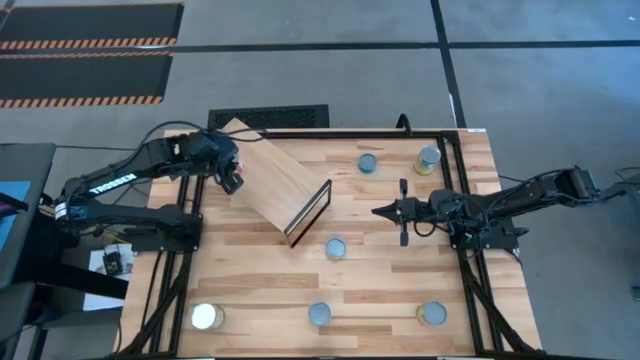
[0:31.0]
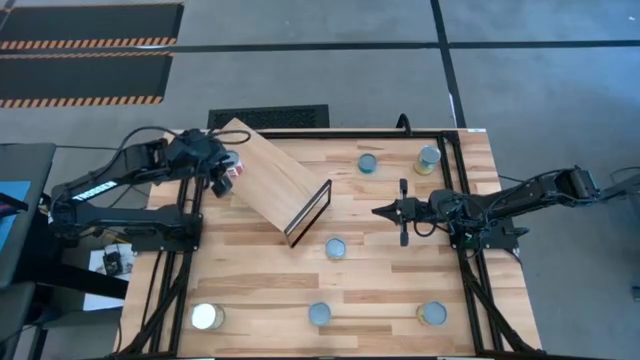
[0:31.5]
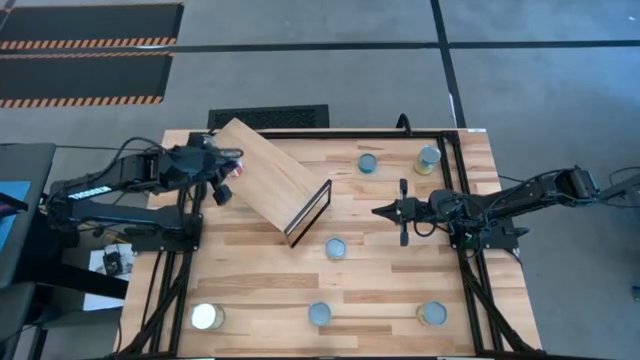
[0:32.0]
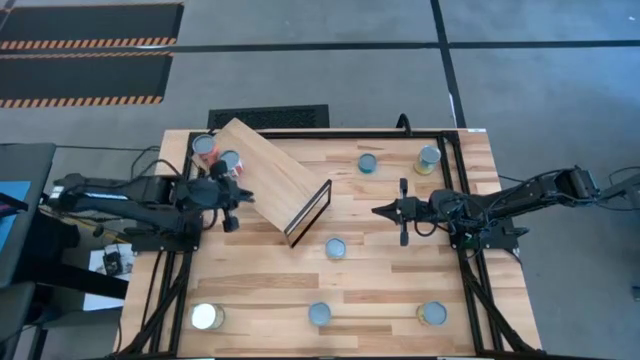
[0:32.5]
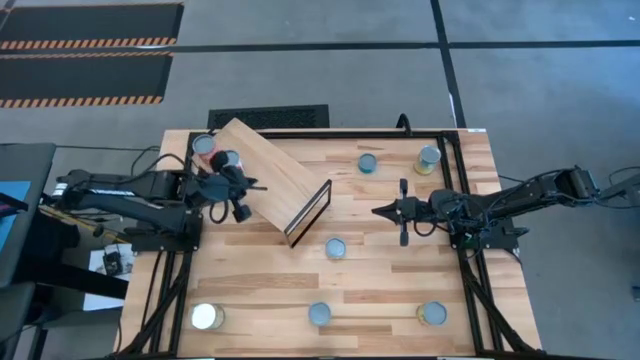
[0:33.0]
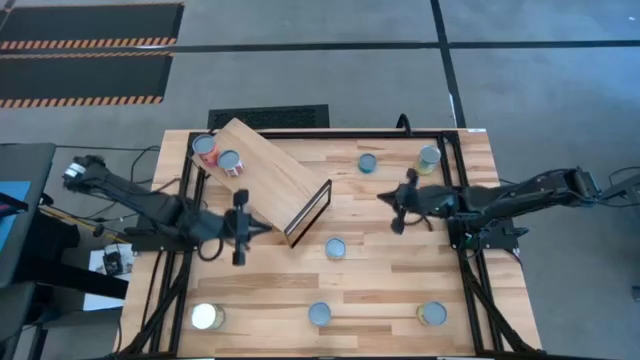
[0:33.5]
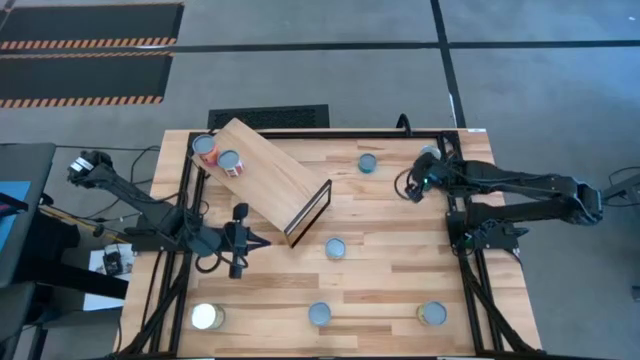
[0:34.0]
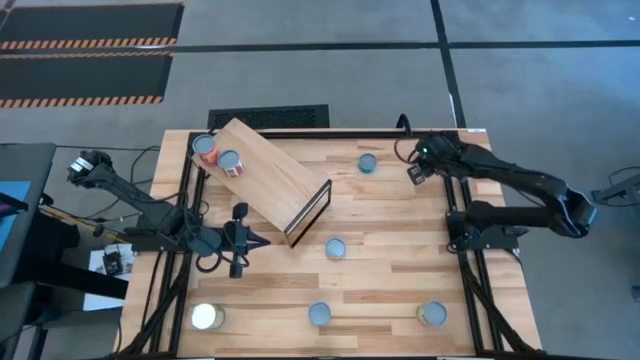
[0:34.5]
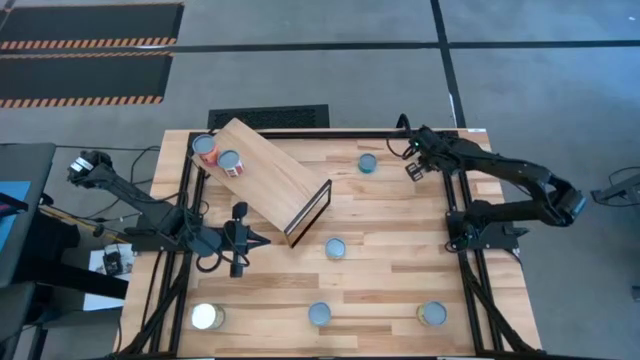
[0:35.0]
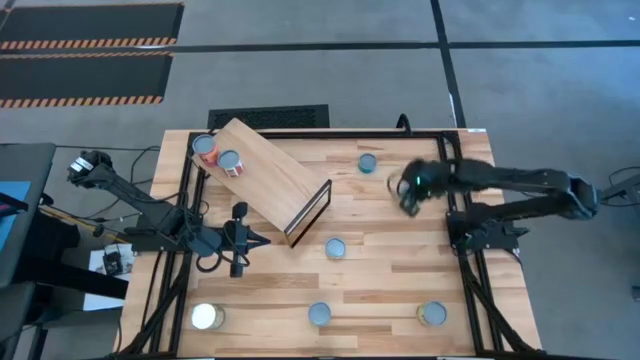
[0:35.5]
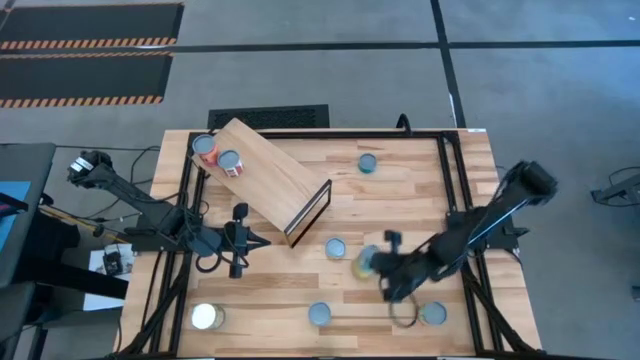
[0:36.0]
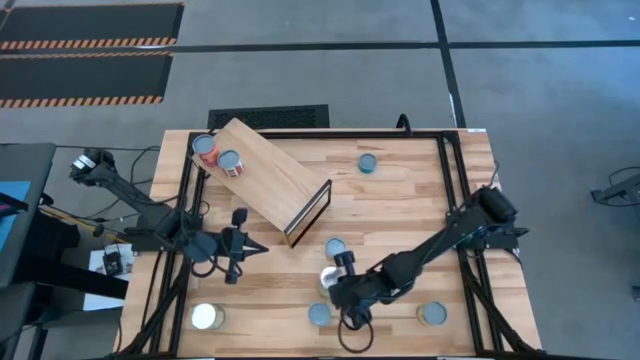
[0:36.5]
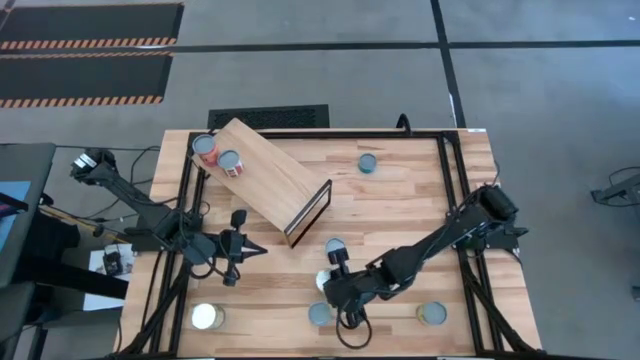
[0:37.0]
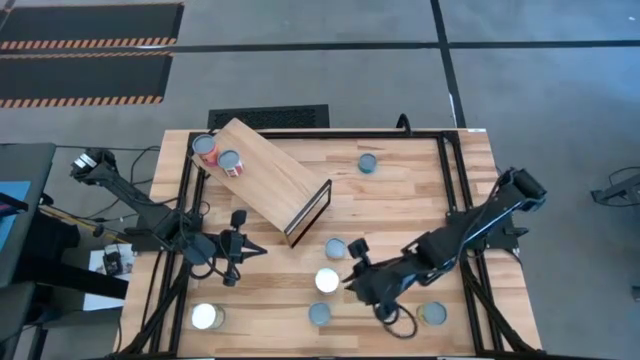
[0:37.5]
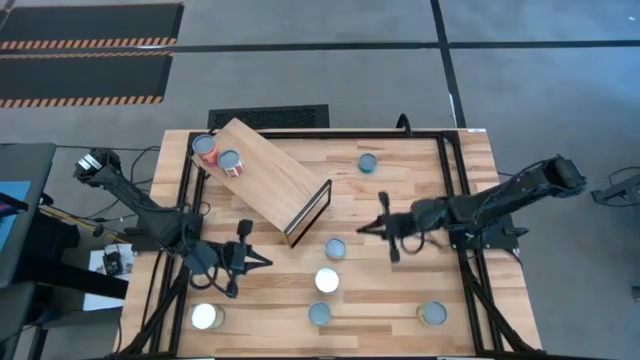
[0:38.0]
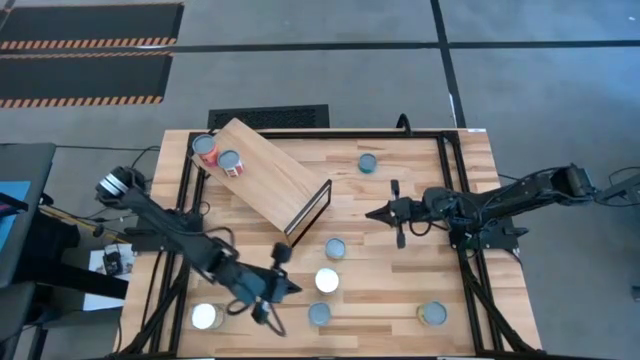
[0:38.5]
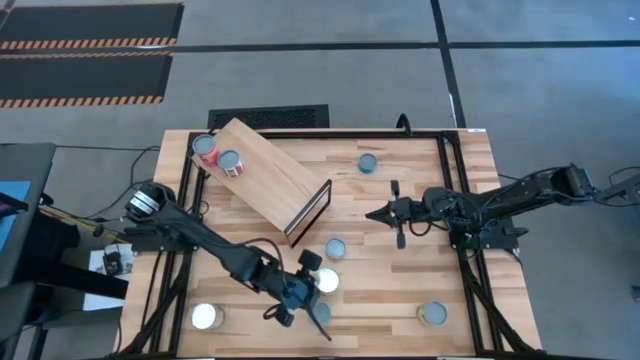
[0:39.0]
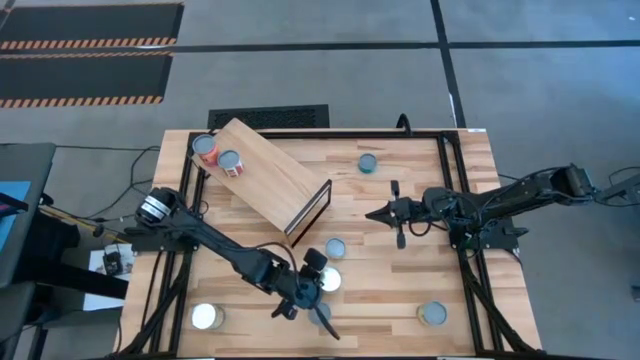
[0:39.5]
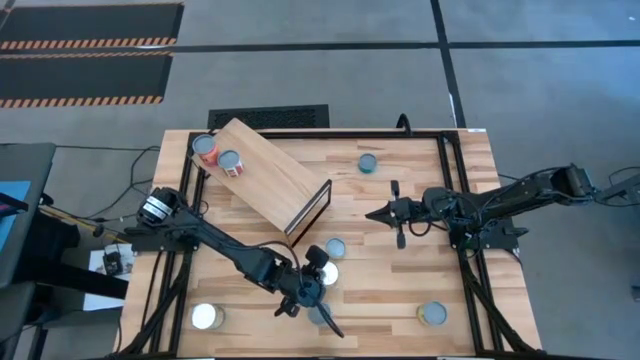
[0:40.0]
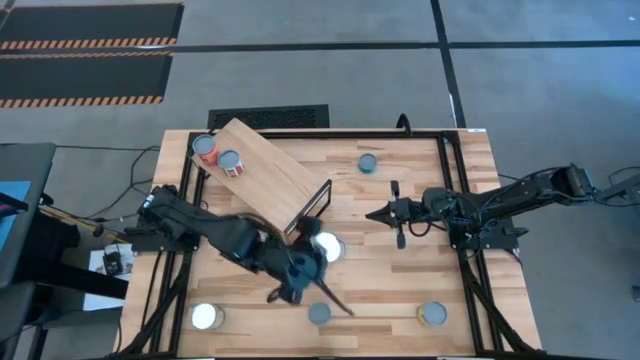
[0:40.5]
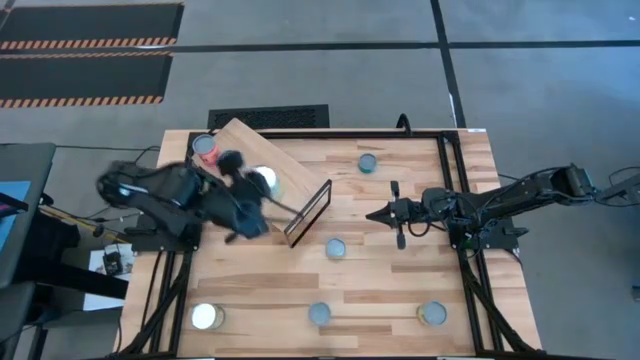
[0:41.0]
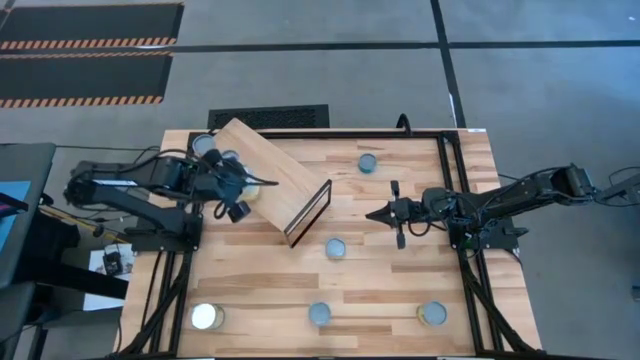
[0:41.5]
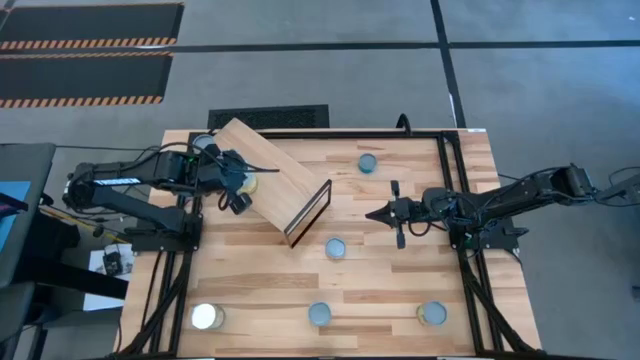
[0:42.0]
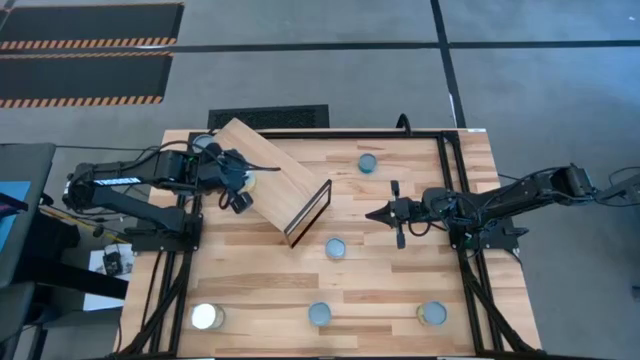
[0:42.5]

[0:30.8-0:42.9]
Task: Pick and place cans onto a shelf
Put the canned carrots on the shelf

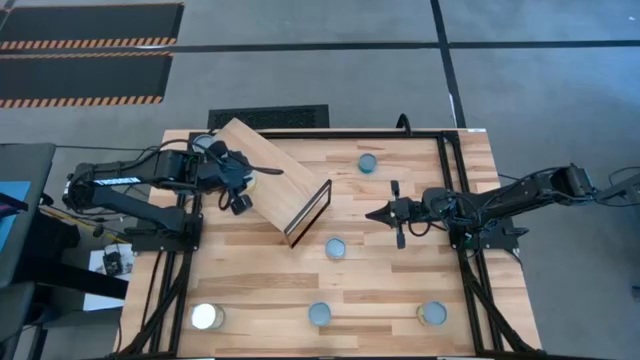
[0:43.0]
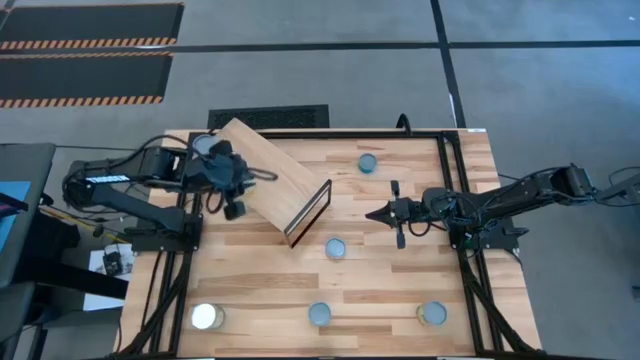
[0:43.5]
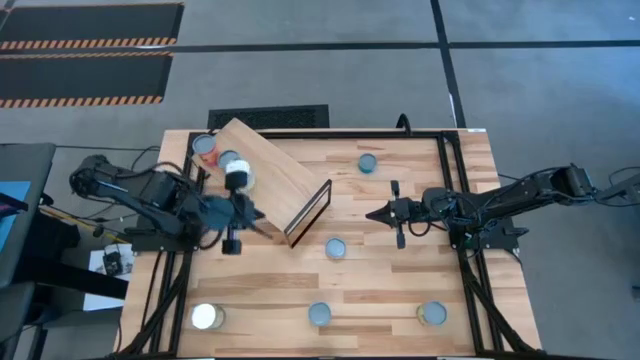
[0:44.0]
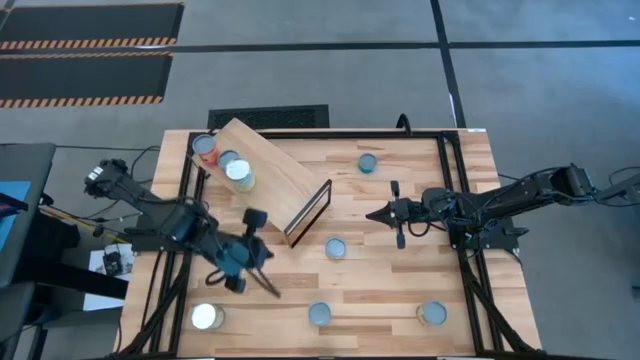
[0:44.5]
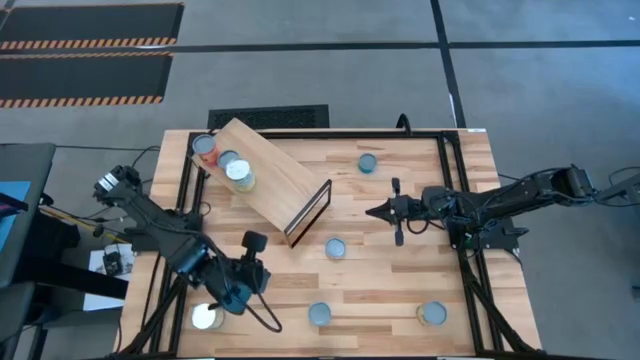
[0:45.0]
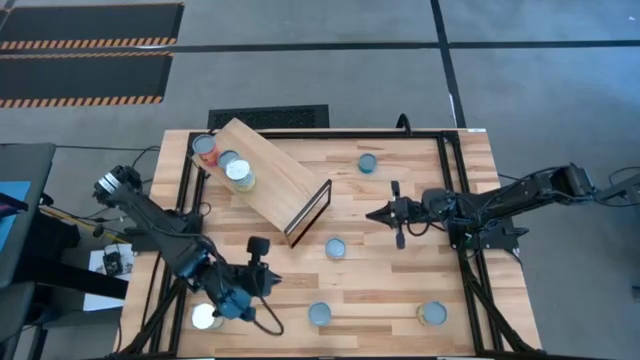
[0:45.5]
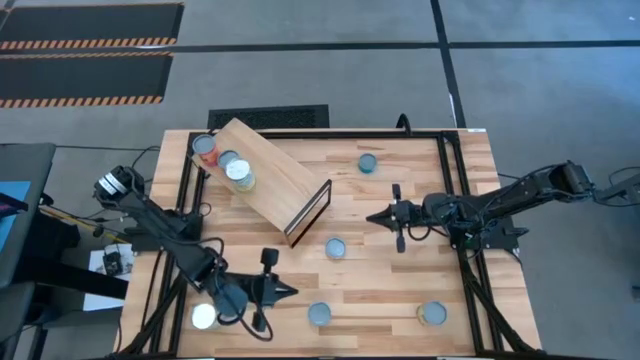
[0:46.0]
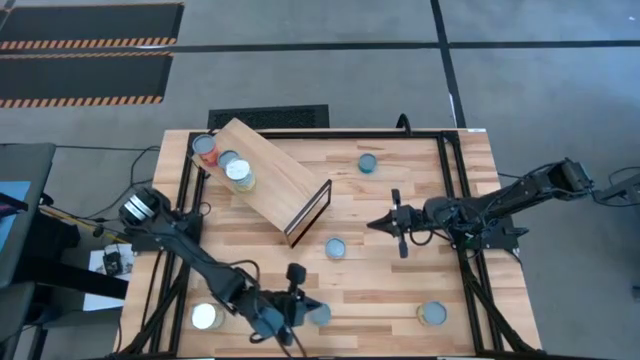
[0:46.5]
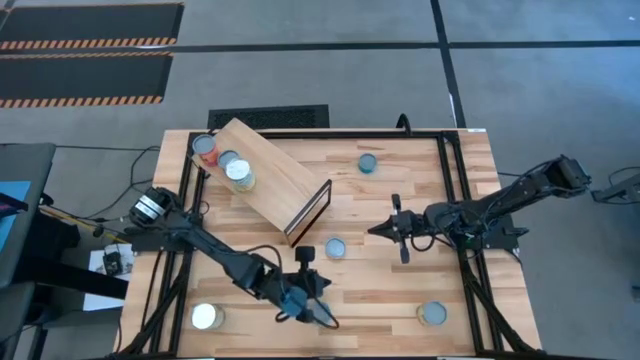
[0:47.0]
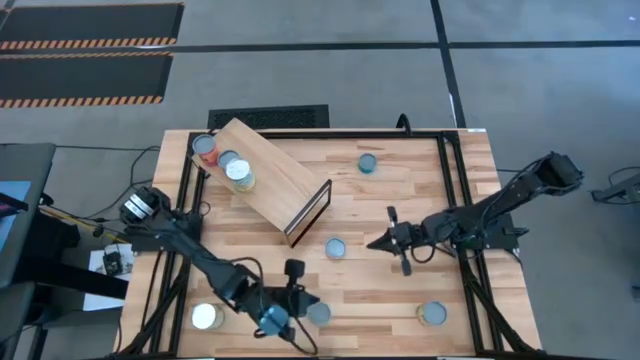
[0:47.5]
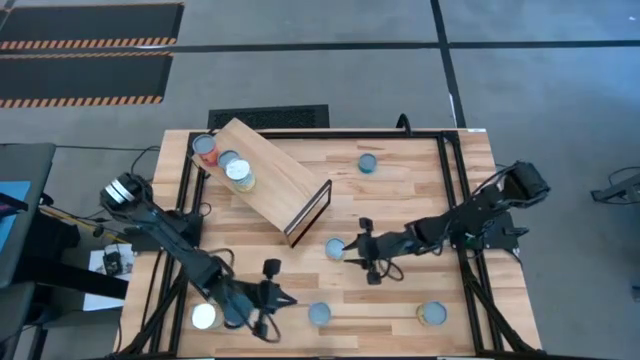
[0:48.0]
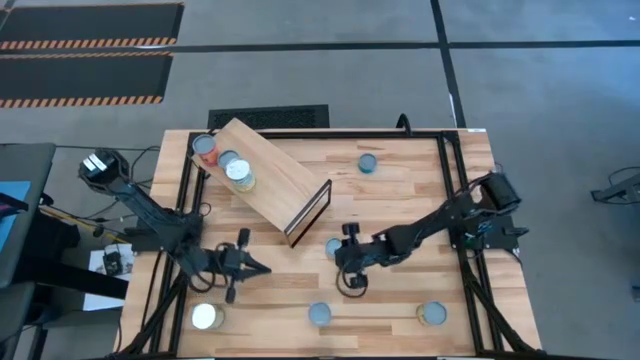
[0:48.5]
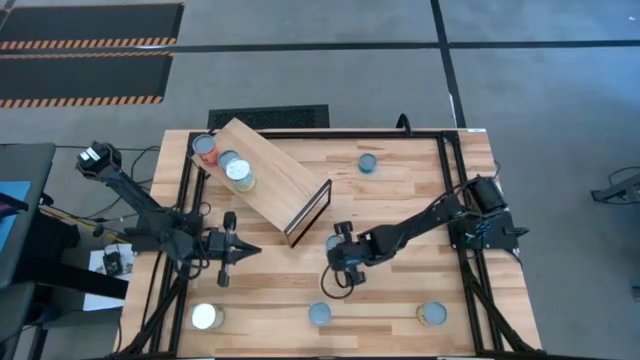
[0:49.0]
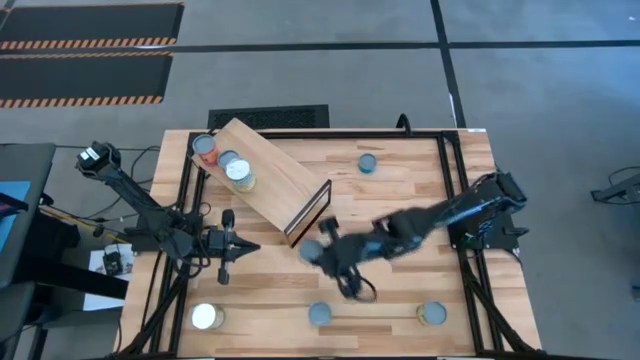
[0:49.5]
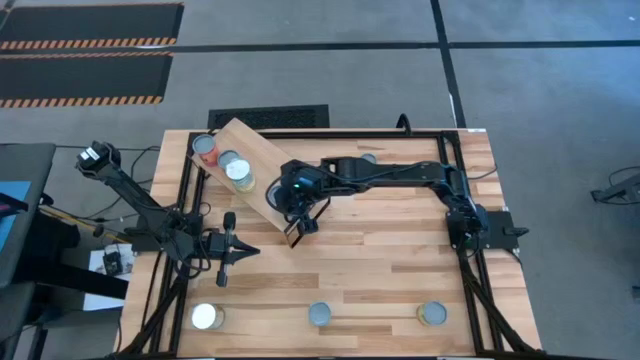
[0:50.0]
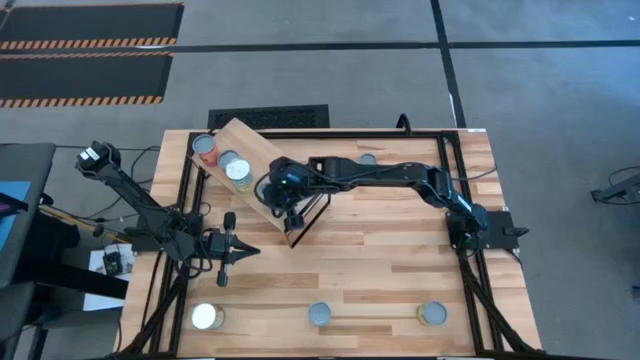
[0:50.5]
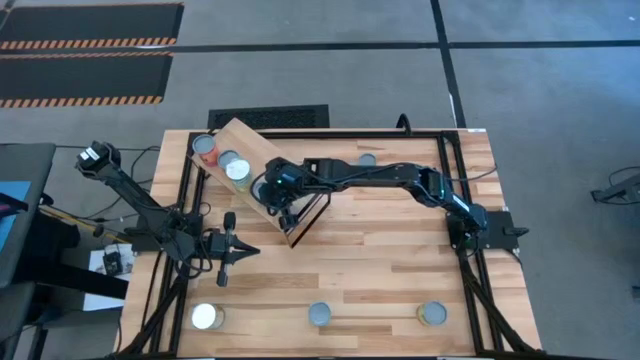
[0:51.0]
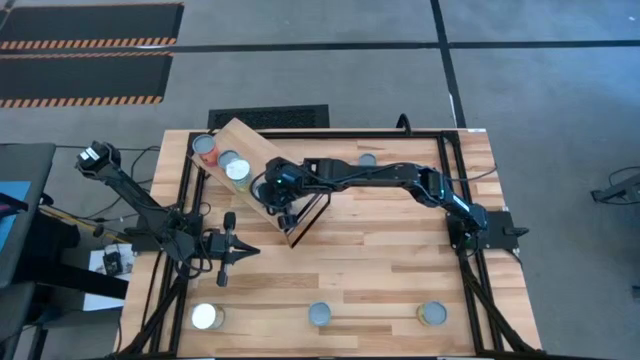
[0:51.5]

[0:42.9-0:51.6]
Put the canned mushrooms on the shelf
